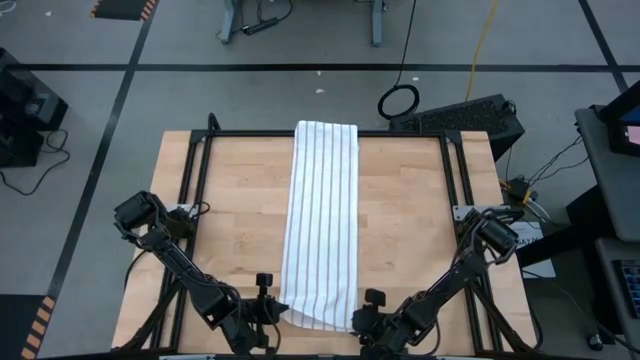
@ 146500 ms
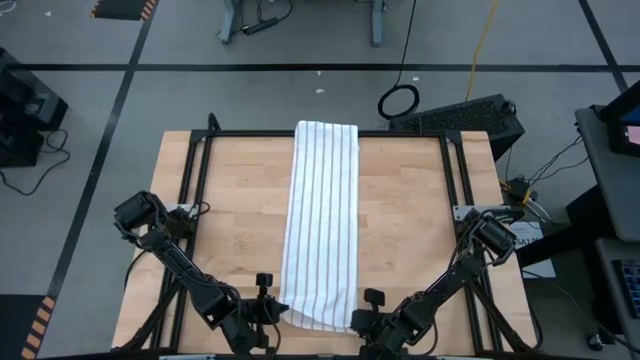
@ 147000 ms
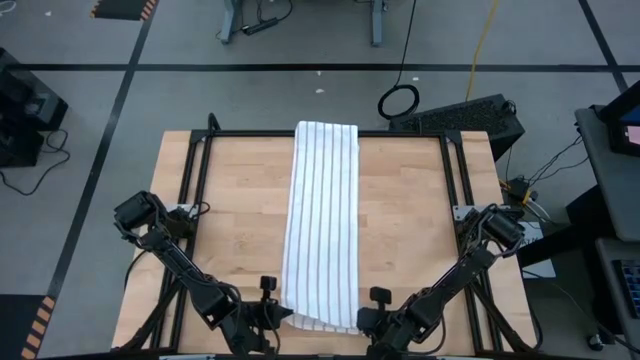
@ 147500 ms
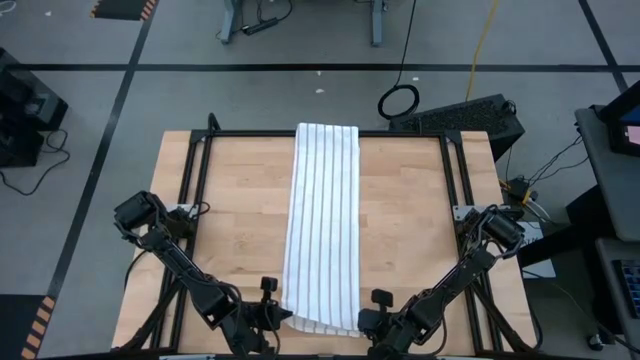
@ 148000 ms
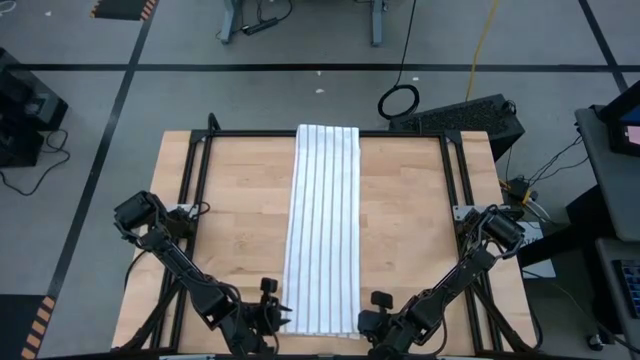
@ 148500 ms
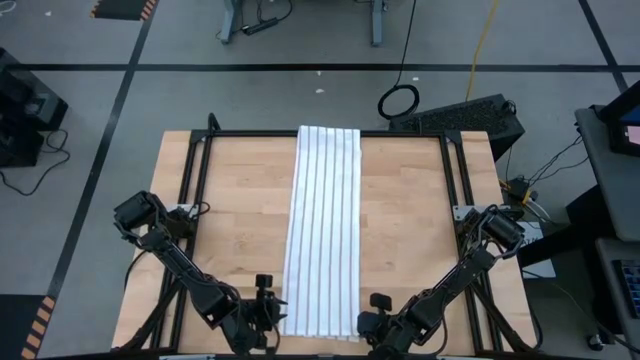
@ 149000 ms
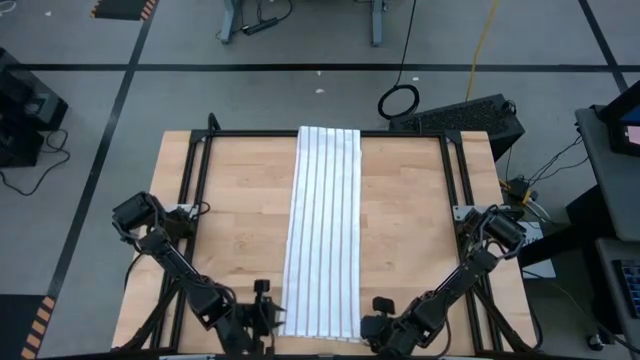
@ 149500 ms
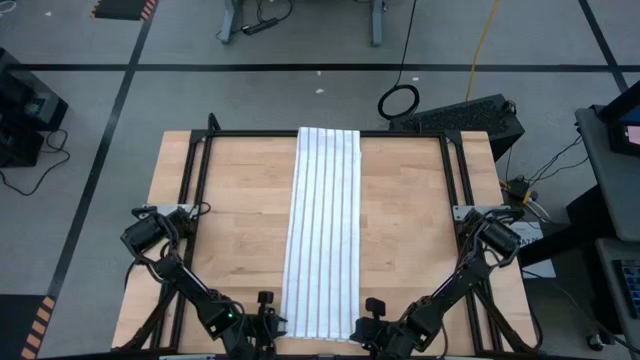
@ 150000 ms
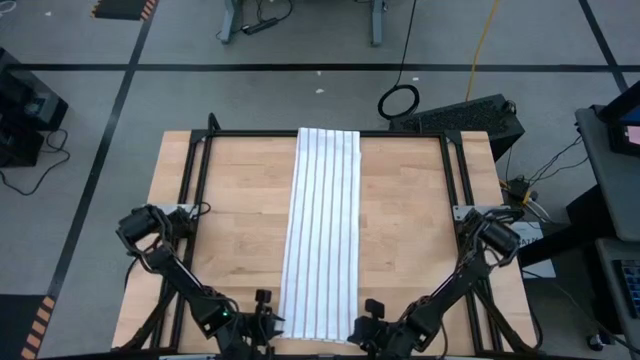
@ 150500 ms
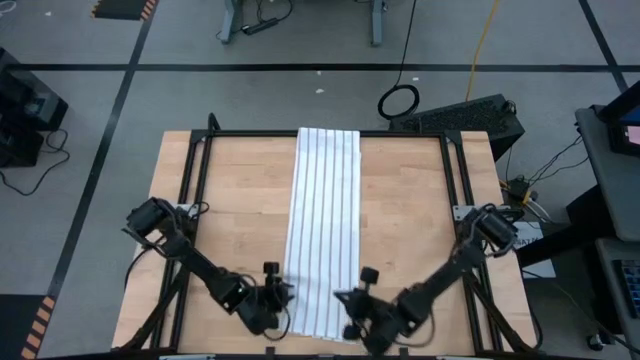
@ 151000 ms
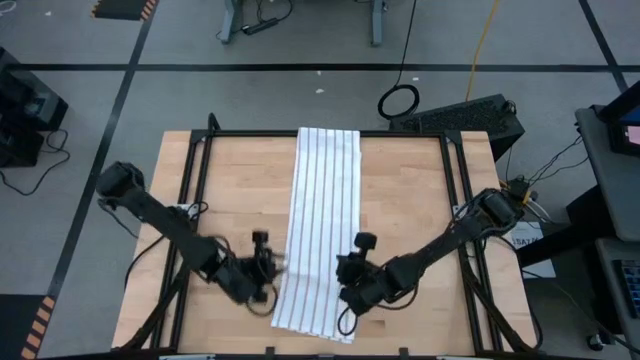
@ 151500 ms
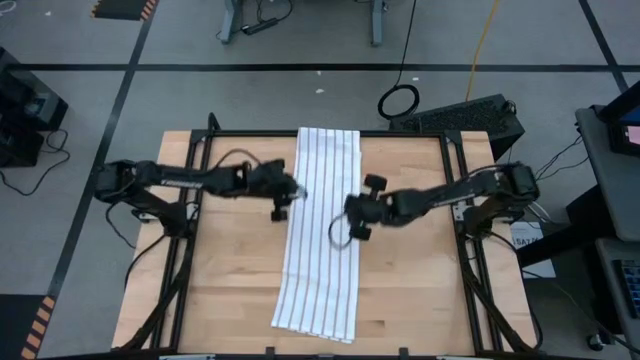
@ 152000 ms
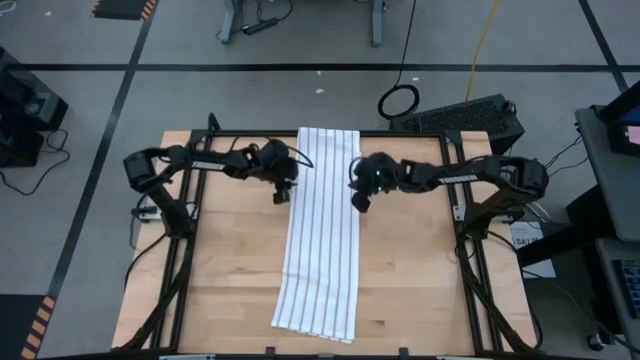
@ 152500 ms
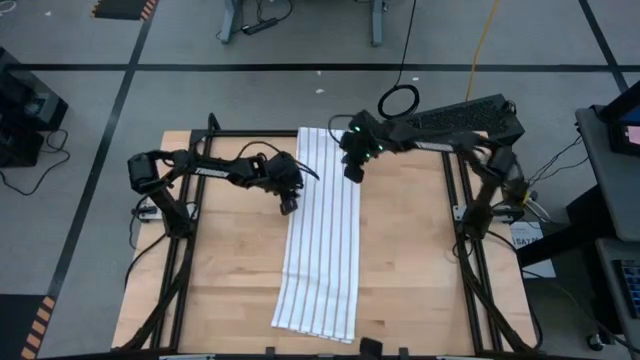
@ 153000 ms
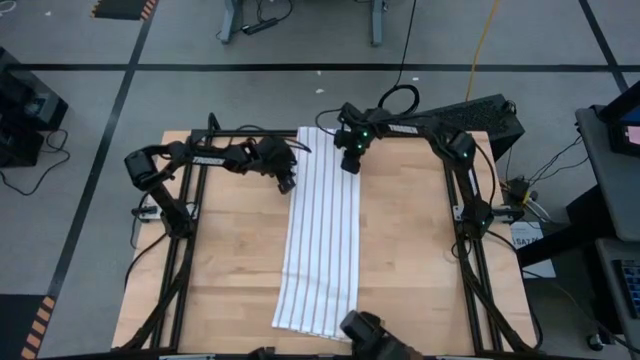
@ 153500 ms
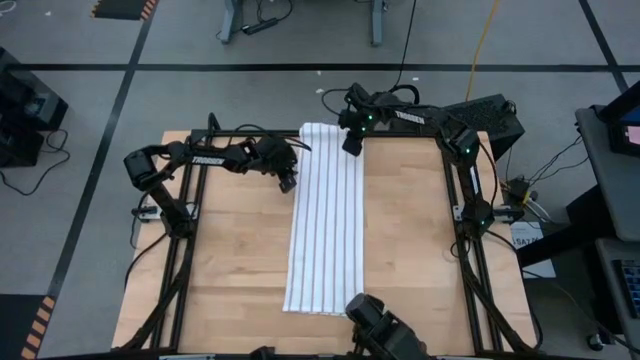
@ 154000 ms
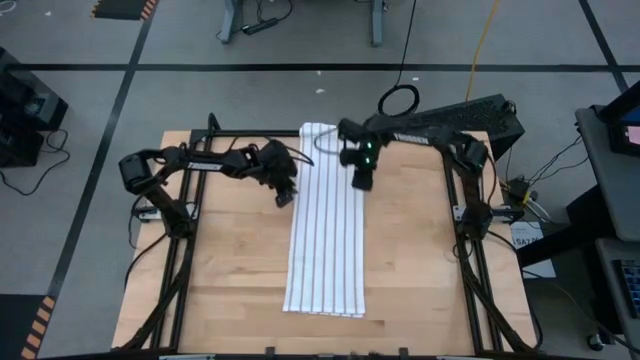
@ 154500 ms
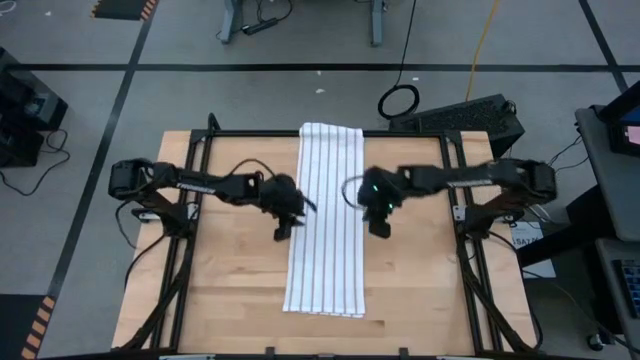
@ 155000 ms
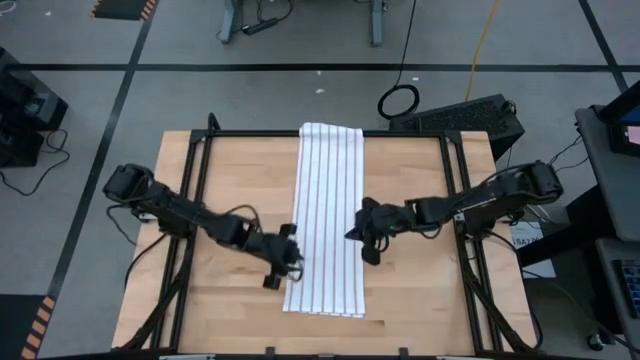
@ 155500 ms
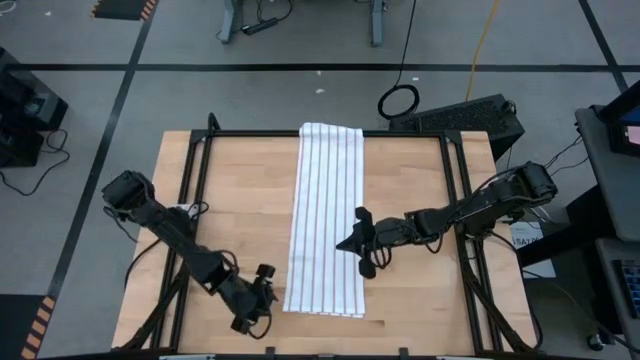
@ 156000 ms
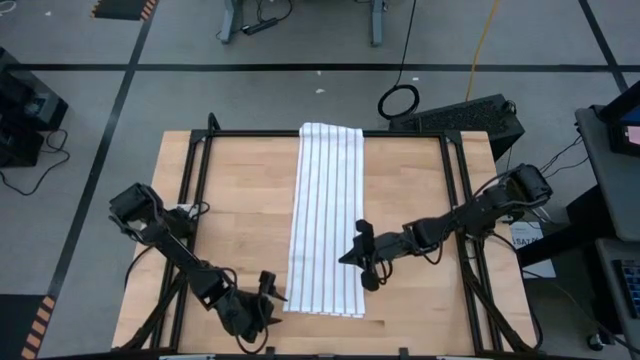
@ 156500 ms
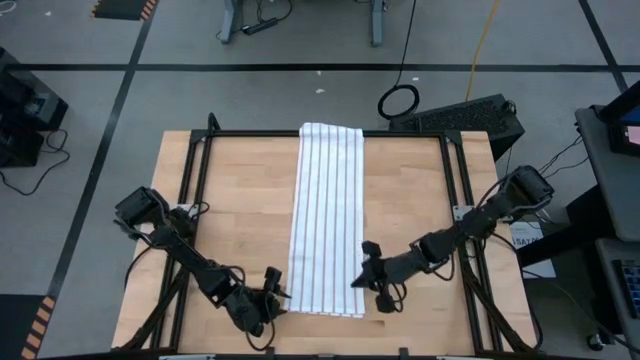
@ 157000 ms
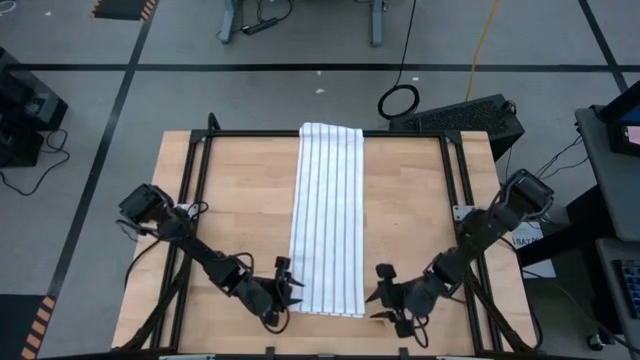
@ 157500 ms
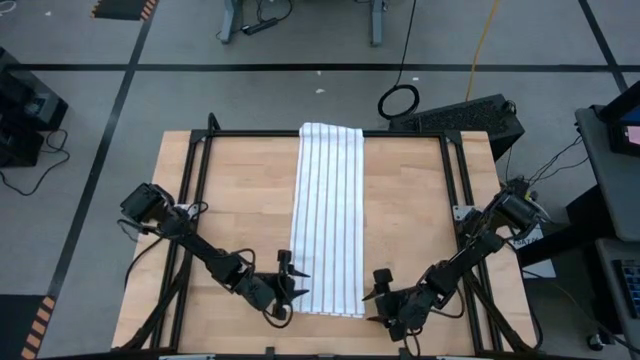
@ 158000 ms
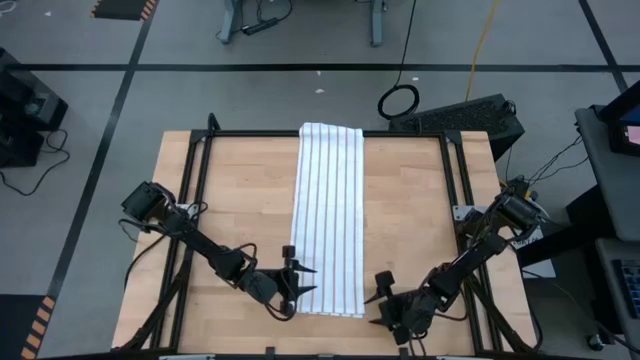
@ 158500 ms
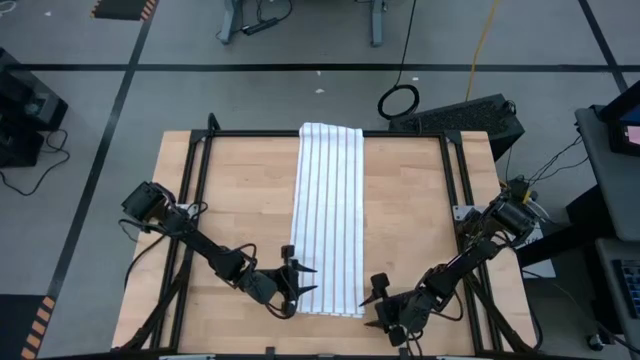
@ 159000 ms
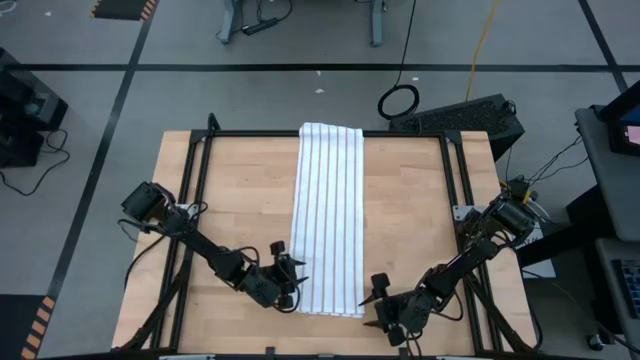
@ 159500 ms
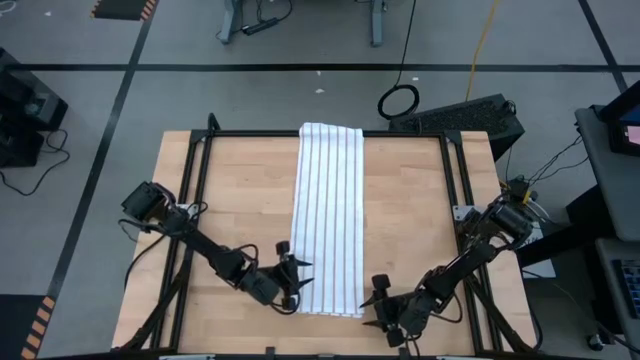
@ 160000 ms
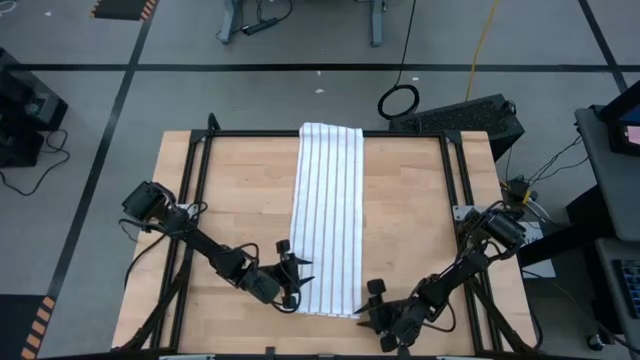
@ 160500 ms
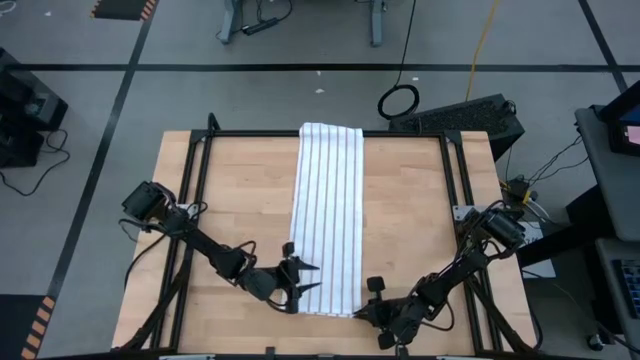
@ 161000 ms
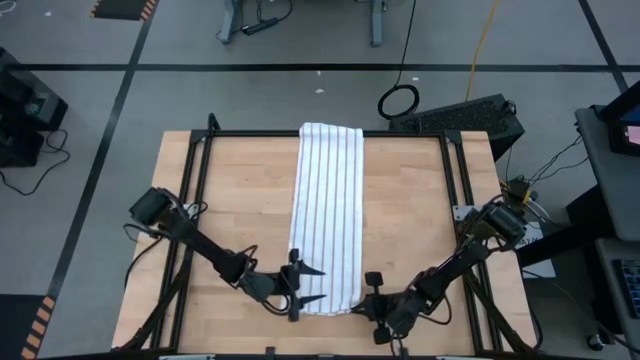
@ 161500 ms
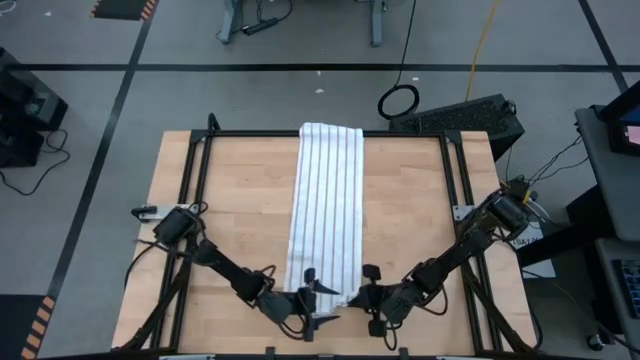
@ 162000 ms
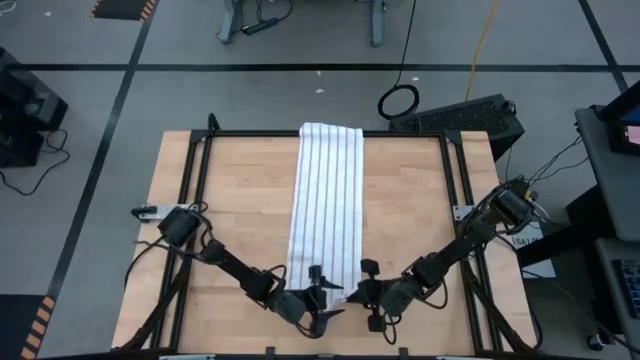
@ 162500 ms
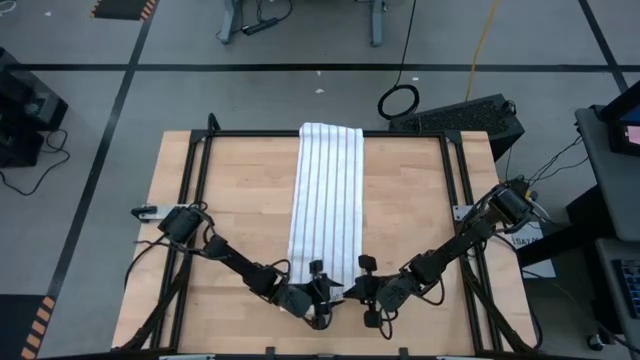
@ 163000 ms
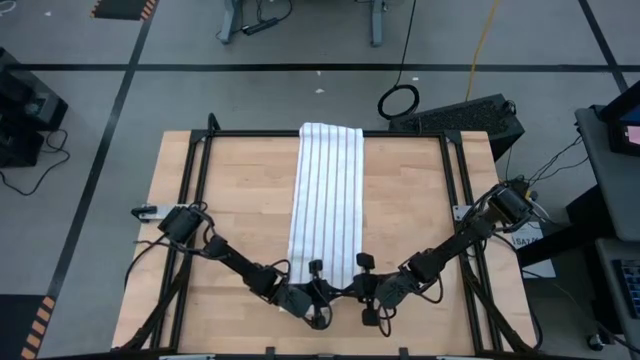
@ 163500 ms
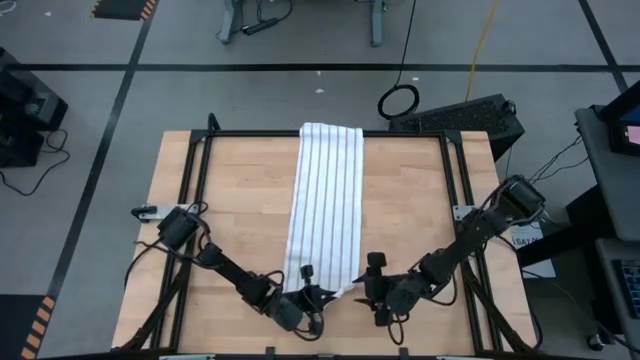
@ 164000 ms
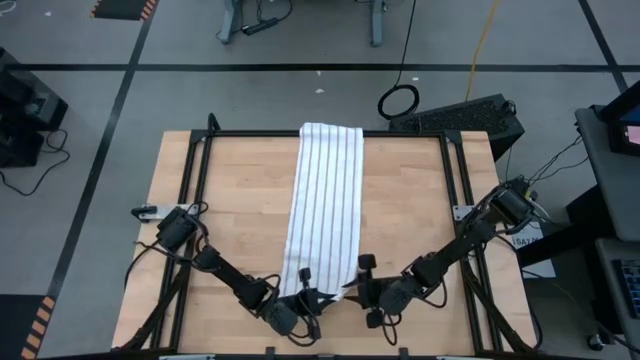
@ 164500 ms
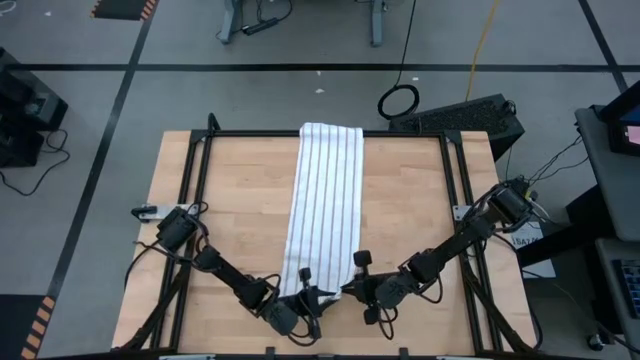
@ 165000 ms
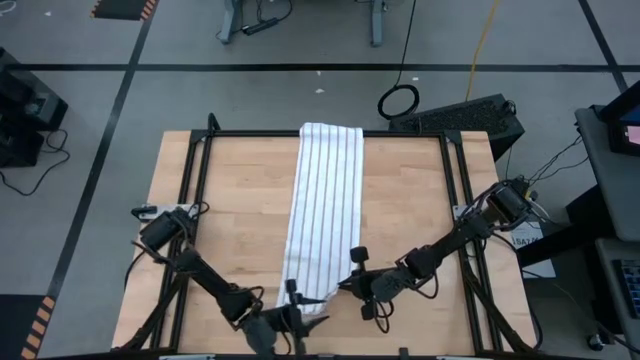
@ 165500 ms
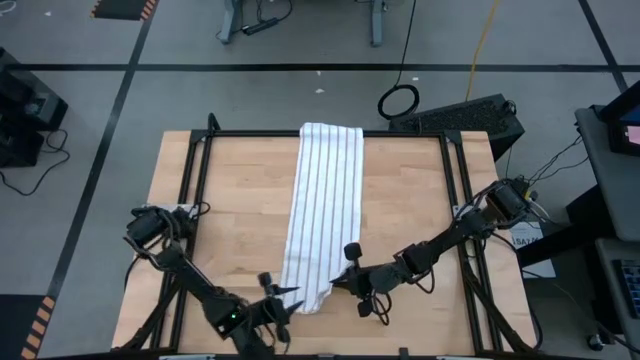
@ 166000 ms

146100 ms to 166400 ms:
Task: Roll towel into tight, uniform cylinder
Fold the white brown kitchen towel

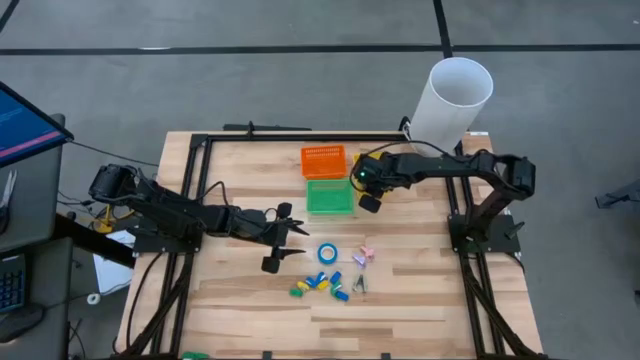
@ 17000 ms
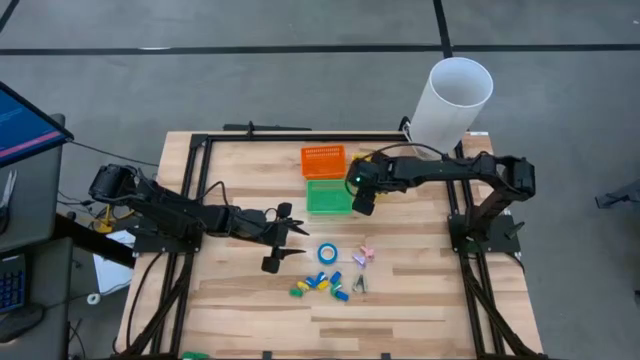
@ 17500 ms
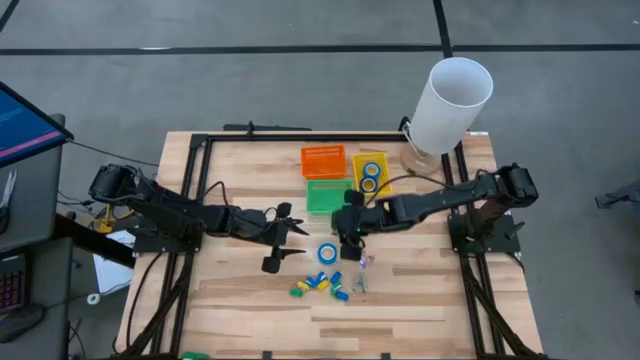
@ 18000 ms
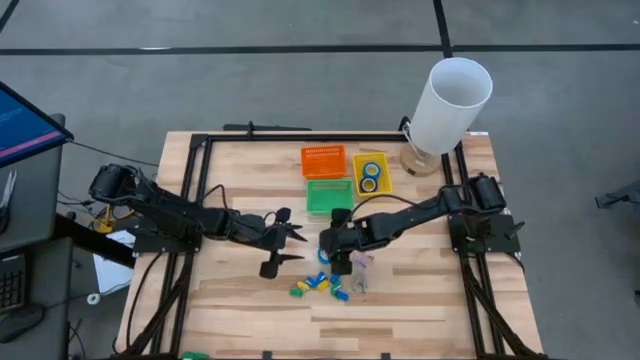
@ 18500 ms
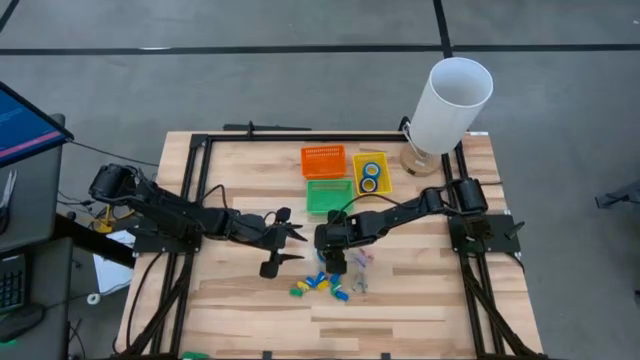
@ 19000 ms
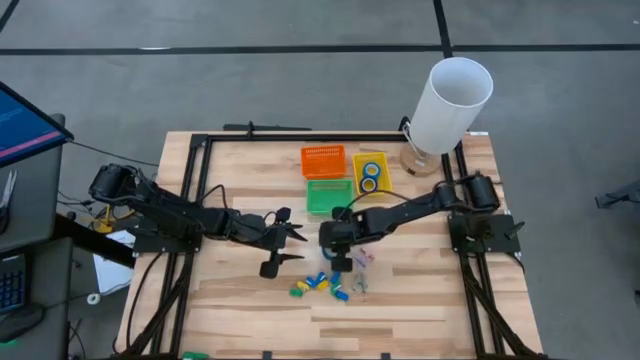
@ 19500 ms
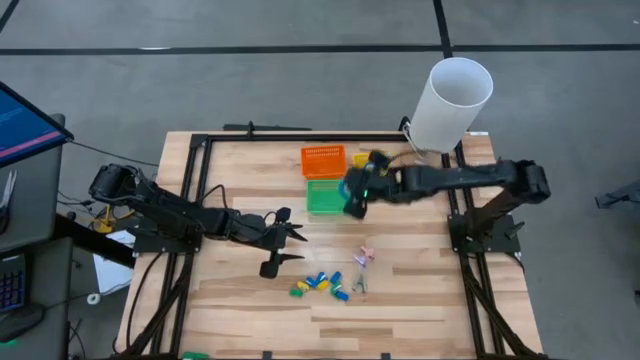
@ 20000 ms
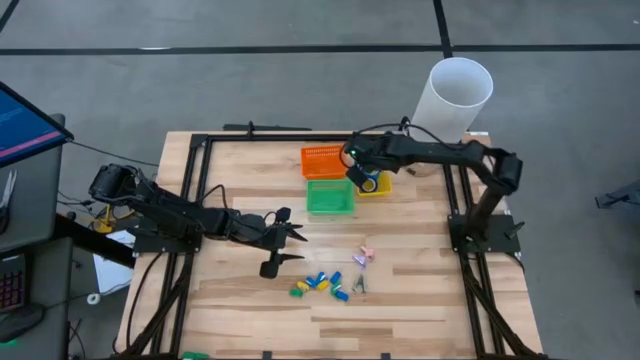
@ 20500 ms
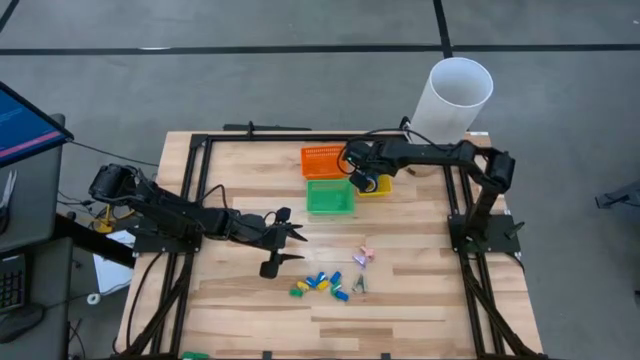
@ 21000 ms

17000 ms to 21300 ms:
Task: Pick and place Stapler, Stapler remover, tape
Put the light blue tape into the yellow bin
